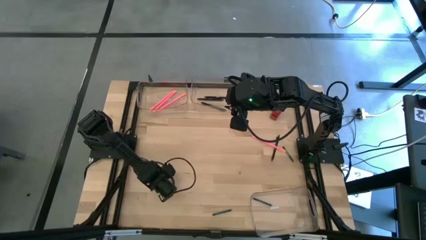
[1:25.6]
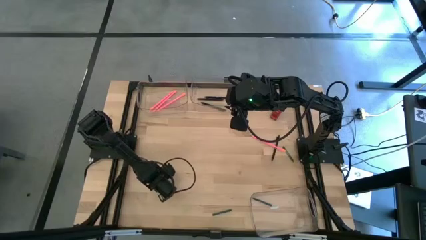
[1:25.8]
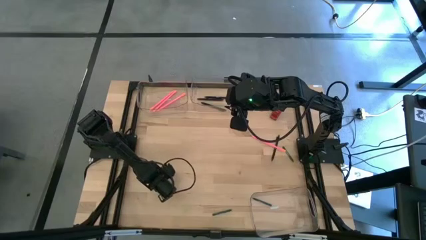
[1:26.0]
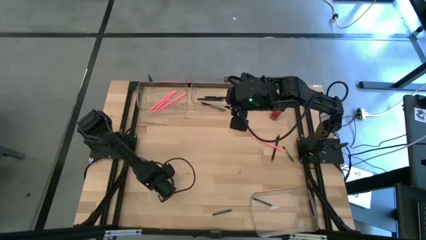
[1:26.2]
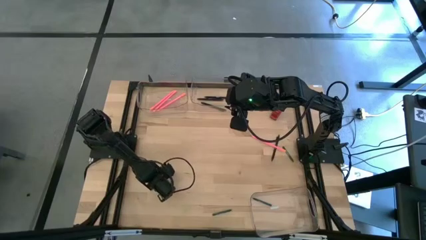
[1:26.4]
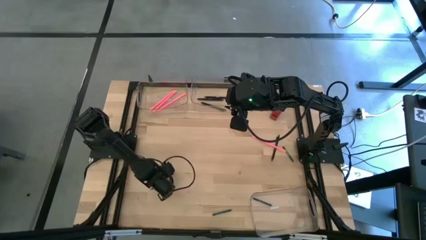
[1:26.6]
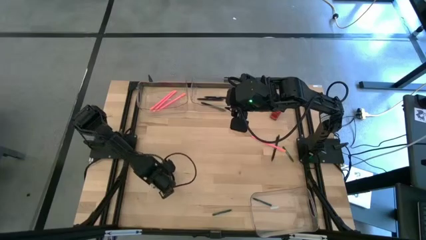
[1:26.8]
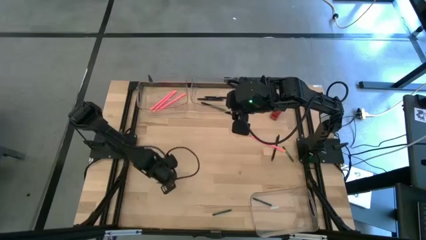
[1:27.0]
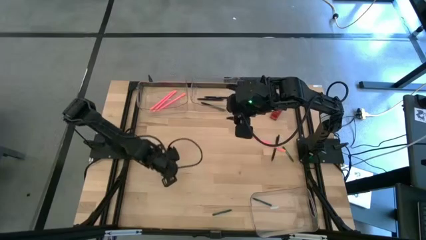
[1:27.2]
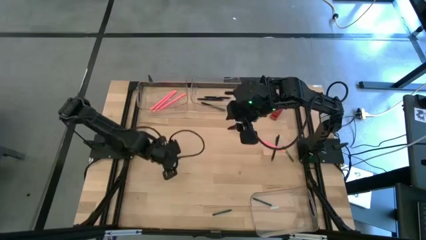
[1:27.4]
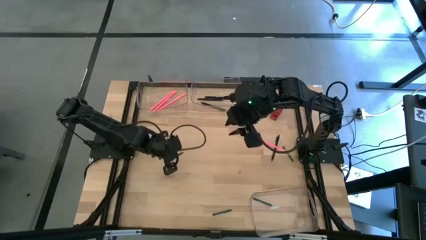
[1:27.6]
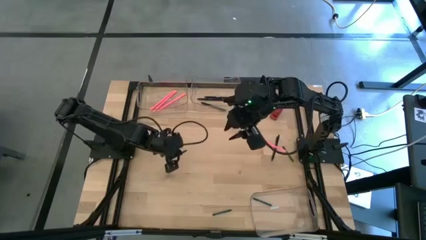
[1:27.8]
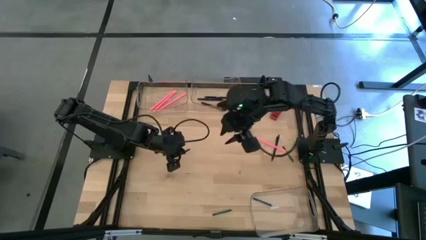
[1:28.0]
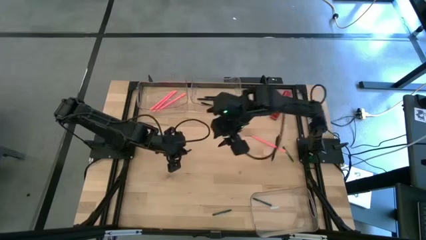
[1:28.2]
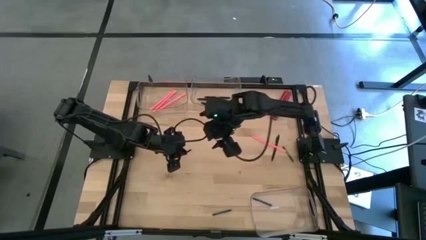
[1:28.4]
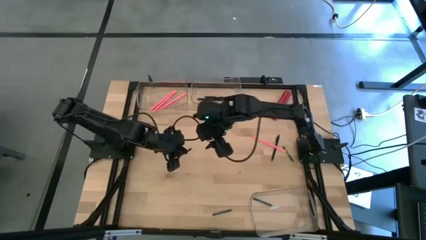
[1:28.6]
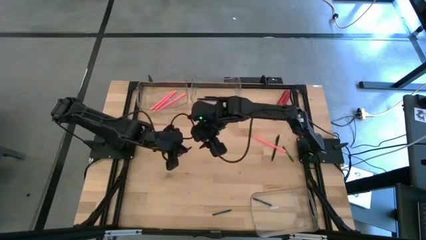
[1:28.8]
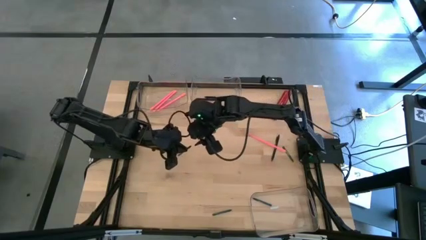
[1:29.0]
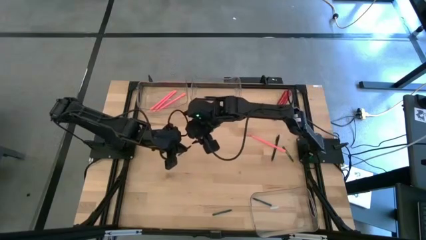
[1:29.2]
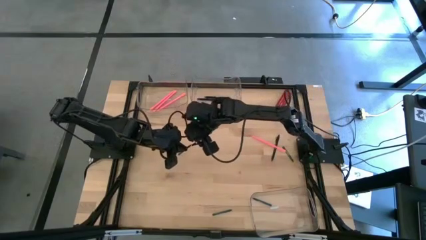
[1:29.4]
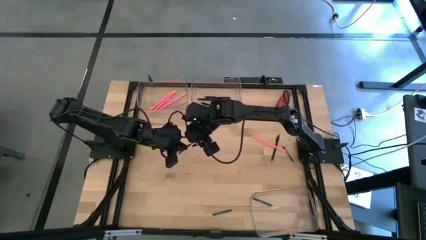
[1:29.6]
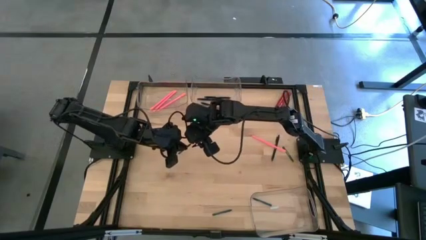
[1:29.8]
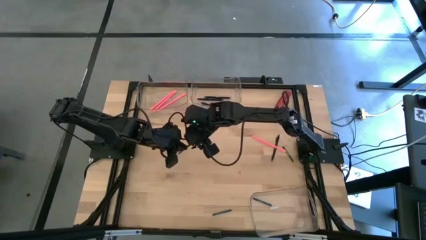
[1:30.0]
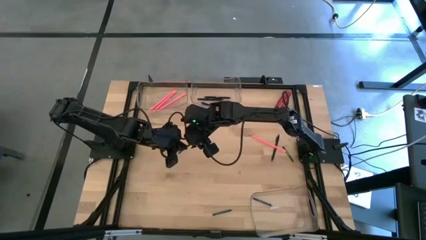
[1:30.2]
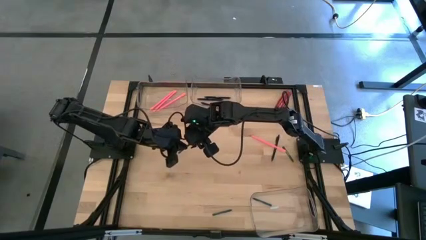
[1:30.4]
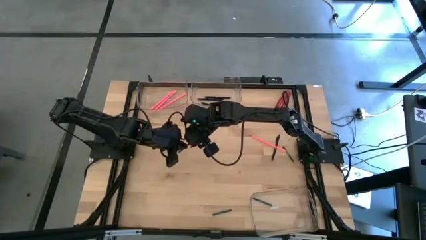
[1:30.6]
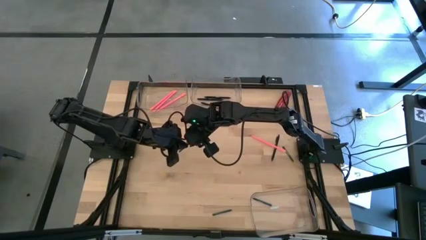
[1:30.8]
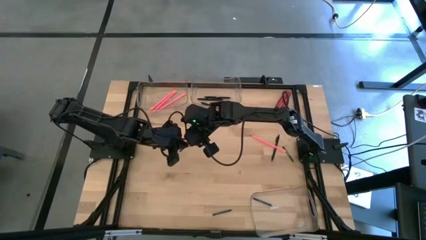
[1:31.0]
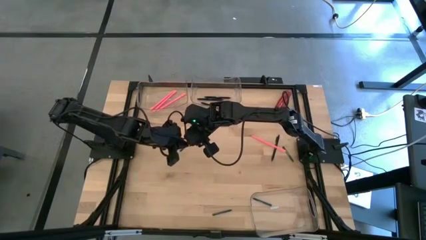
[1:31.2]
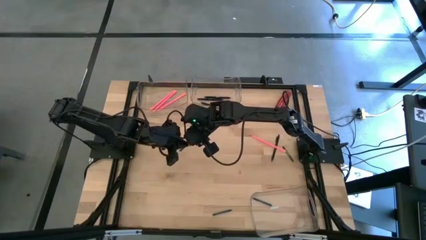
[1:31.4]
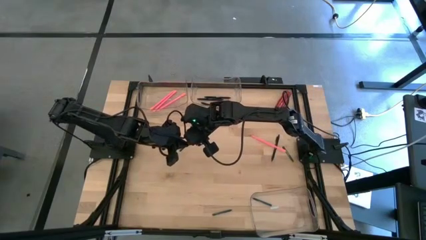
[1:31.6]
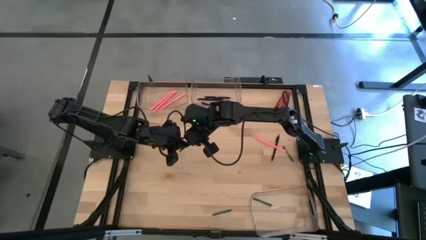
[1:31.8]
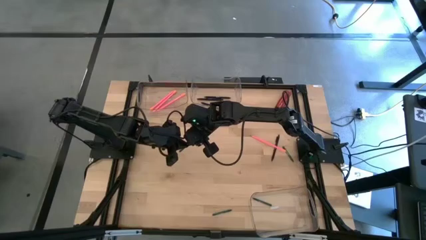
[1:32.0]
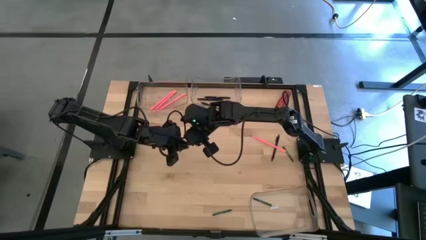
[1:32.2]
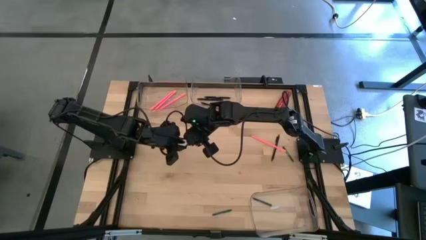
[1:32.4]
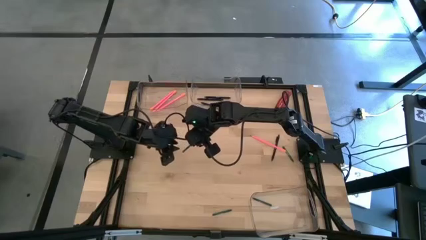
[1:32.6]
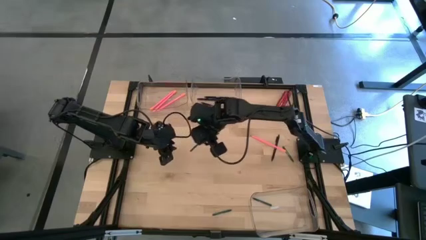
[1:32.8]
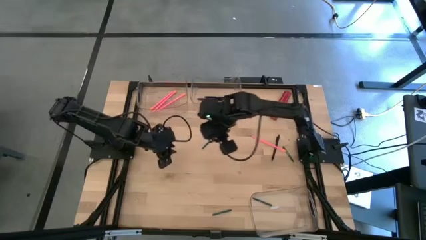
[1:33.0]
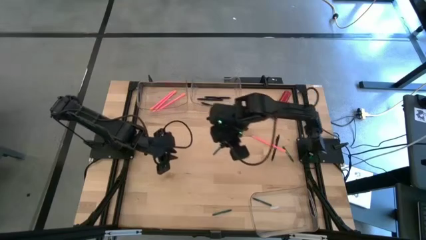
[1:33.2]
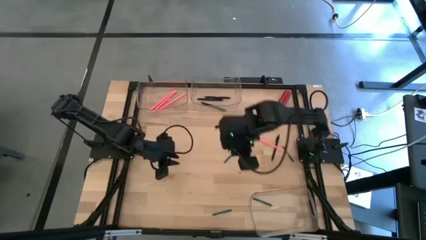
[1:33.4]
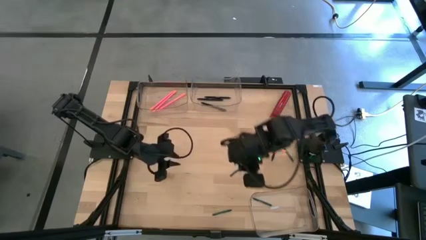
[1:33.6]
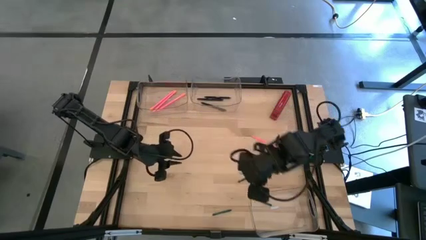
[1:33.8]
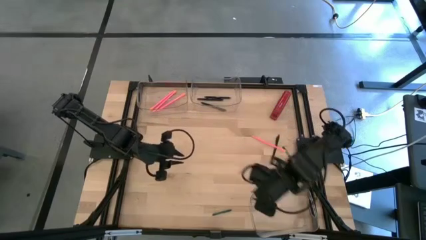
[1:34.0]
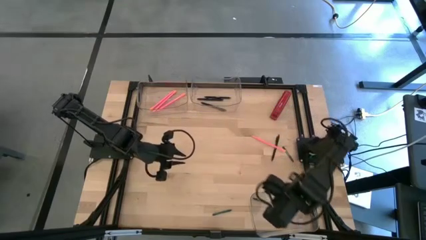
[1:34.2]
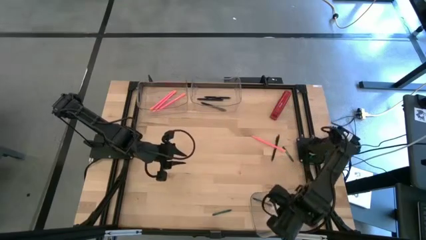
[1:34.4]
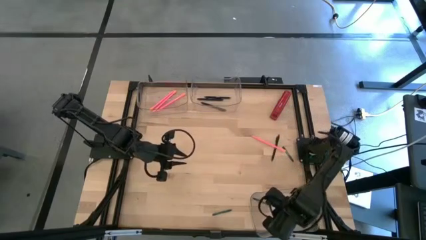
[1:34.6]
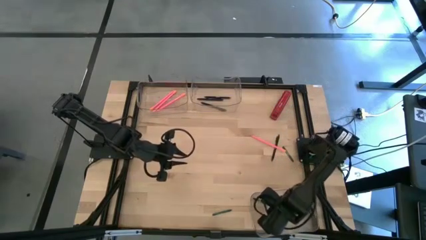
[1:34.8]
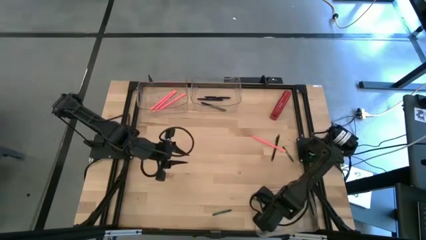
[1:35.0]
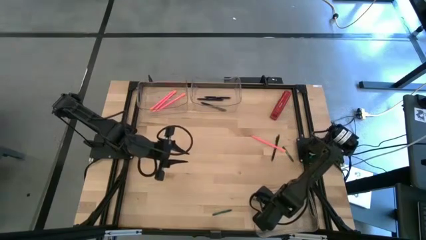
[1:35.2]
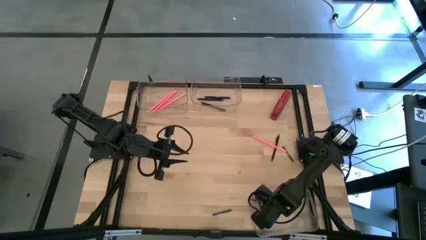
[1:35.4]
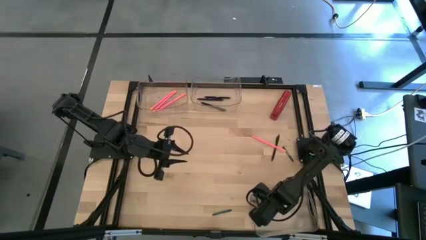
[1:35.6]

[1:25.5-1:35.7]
Task: Sort crayons/erasers/pens/pencils in bins
Put the green crayon into the bottom transparent bin

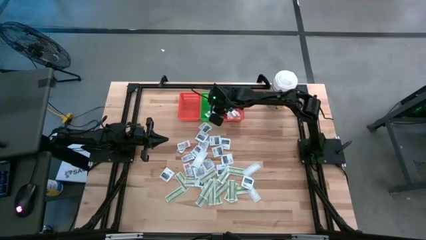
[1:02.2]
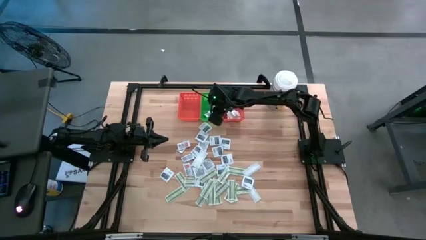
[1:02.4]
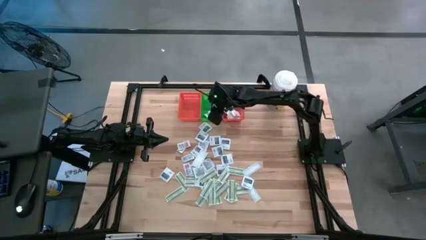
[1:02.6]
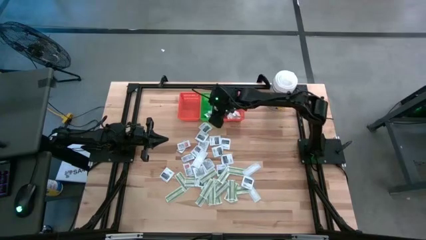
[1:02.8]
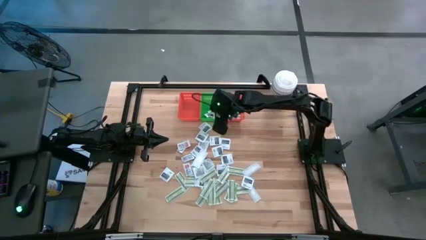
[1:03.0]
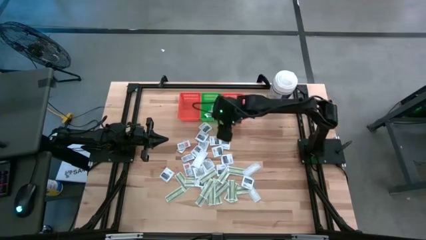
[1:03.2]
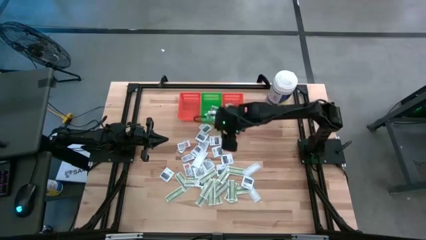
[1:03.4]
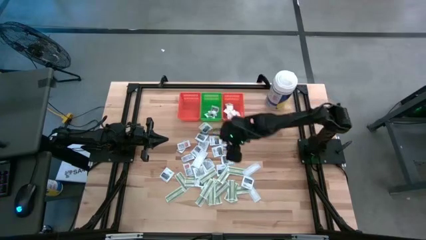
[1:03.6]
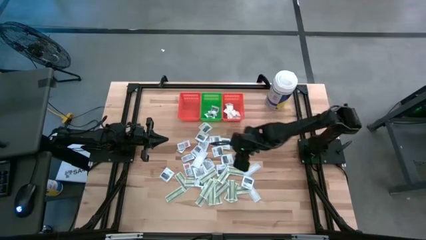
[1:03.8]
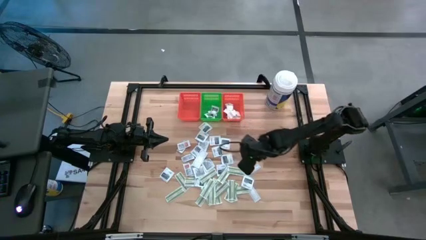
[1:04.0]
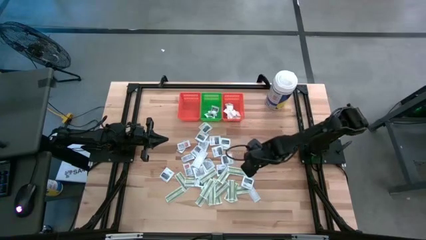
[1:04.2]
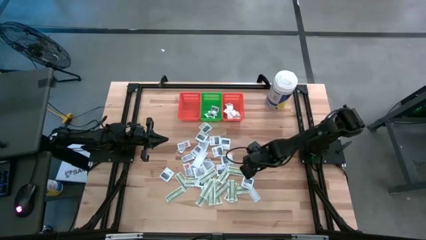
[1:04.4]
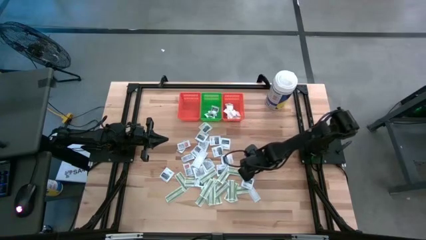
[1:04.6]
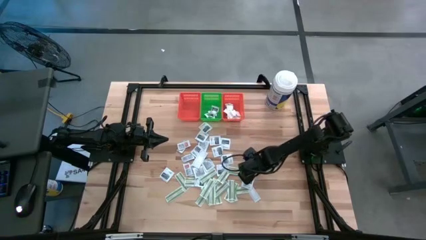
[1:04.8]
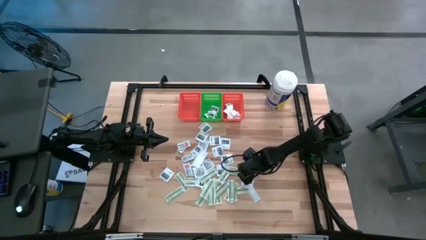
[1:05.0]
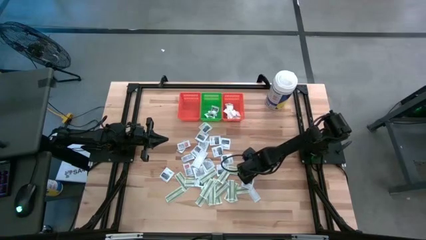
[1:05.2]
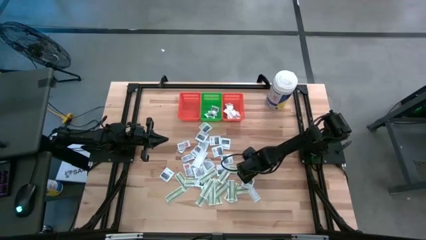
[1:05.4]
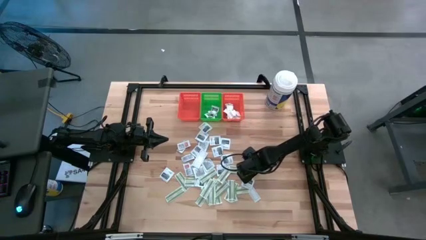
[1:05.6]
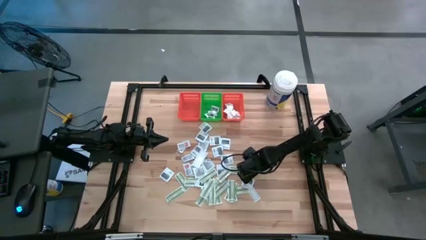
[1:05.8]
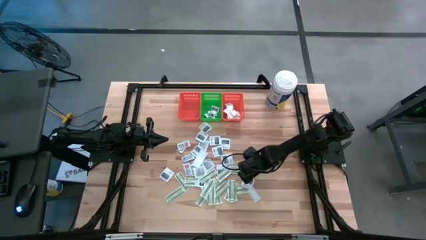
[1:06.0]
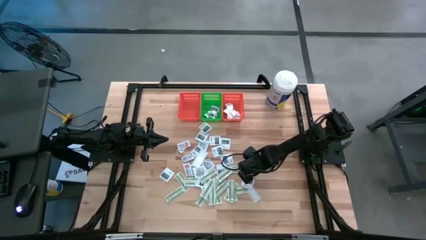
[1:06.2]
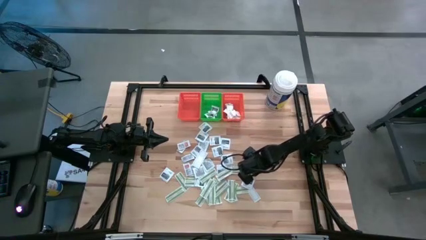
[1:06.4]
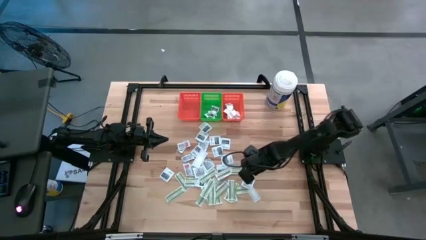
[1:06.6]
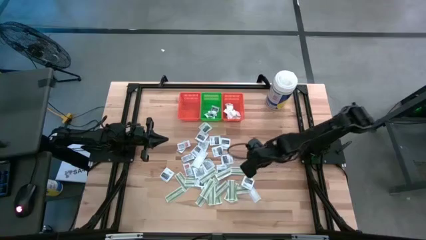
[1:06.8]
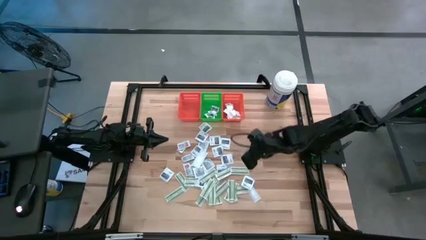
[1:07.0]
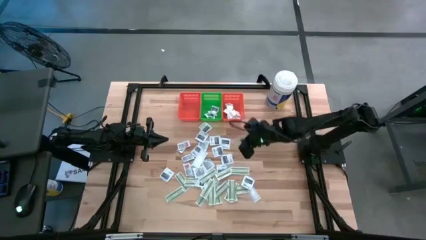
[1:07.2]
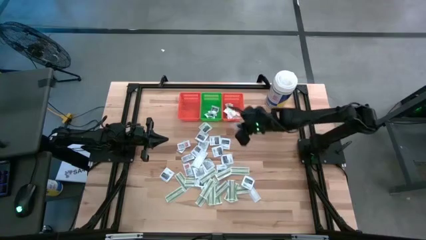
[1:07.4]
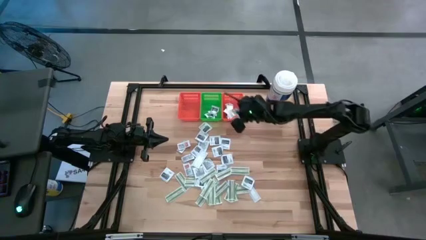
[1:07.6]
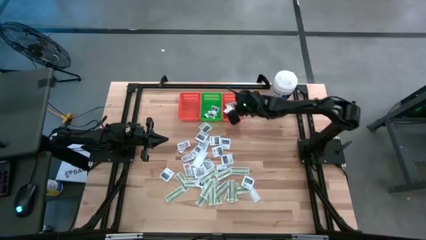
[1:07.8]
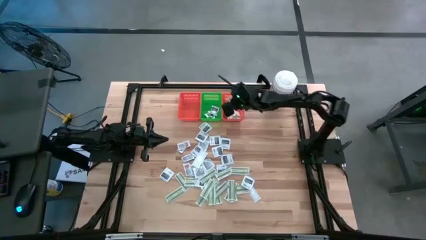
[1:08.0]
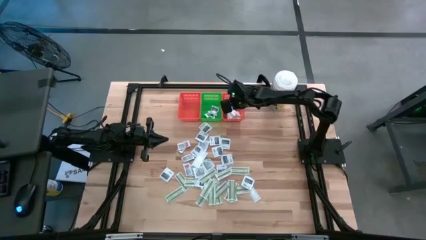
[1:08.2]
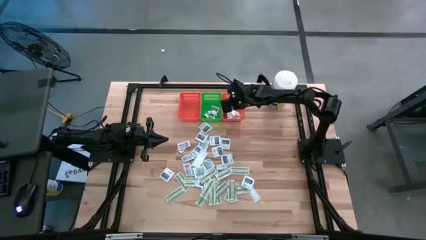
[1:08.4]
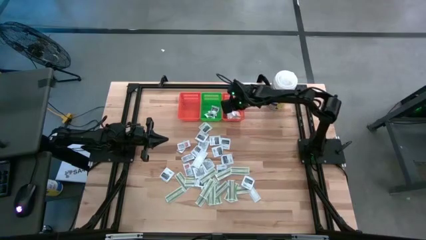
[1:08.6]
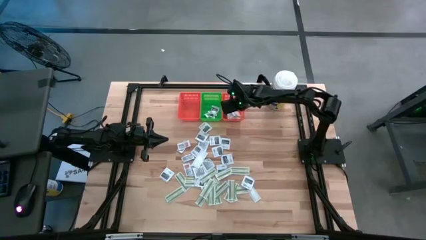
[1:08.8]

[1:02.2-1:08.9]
Task: Pick & Place First Aid Supplies
Put the bandage pack into the right orange bin
